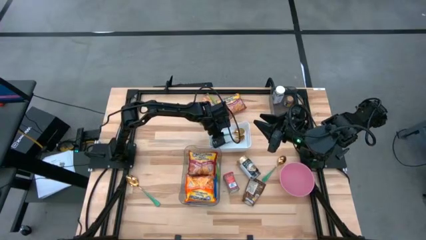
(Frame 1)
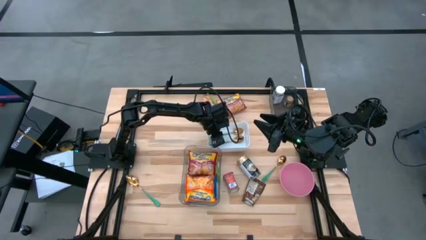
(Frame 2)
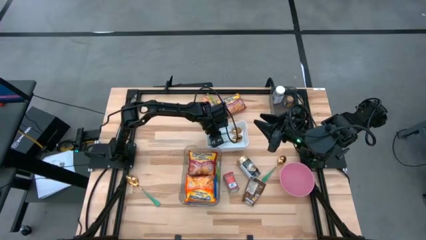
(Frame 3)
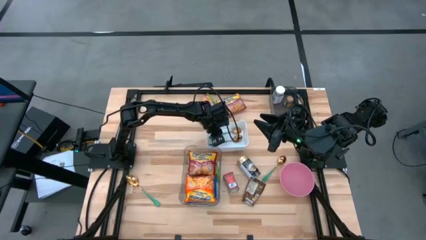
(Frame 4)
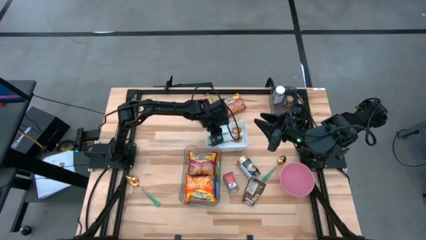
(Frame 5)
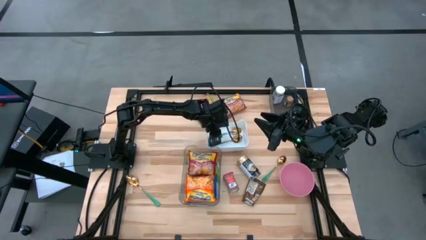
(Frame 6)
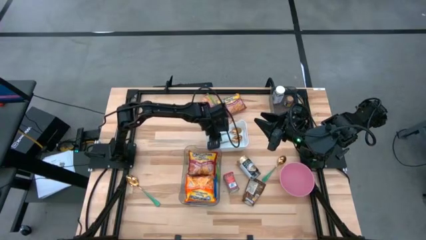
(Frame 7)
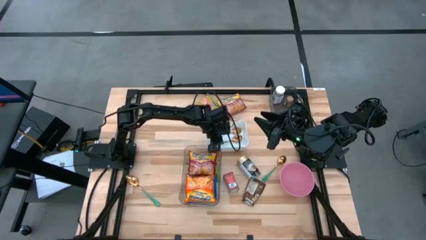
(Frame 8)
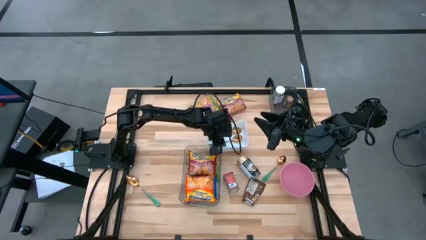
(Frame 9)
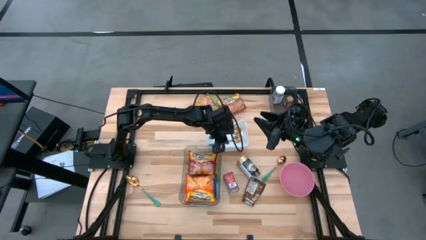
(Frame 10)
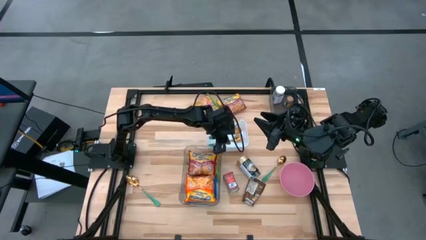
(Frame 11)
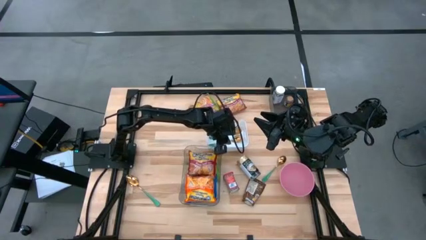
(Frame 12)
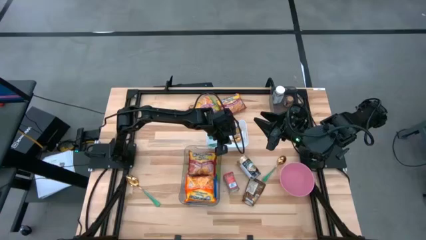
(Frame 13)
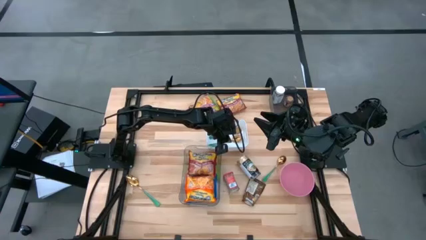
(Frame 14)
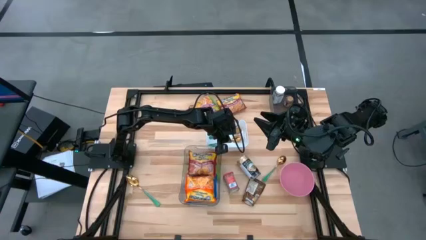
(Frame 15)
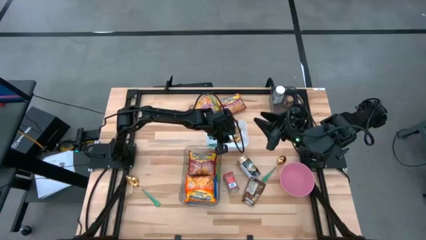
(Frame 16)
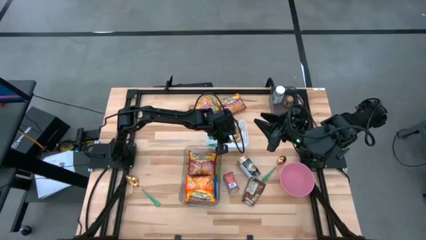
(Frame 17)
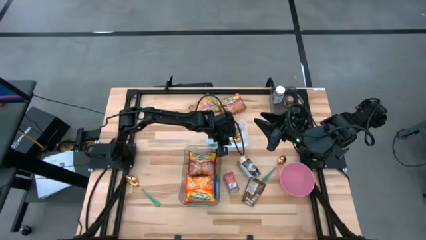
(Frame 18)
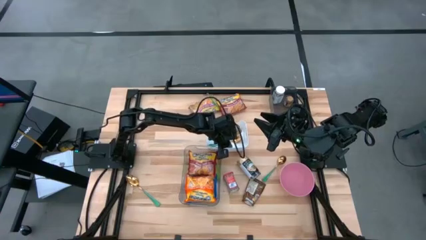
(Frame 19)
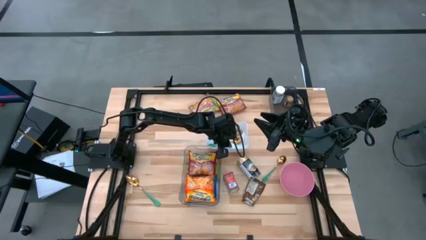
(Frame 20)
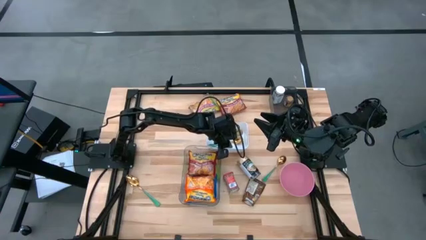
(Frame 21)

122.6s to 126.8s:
Task: Pick & Place Food Item
Adjust the white bin

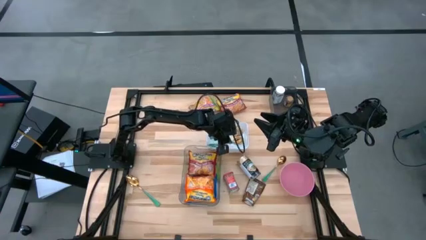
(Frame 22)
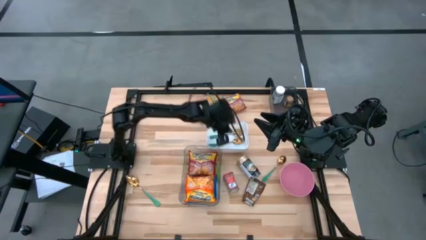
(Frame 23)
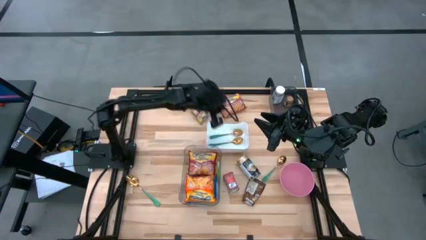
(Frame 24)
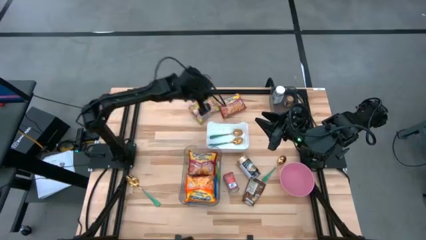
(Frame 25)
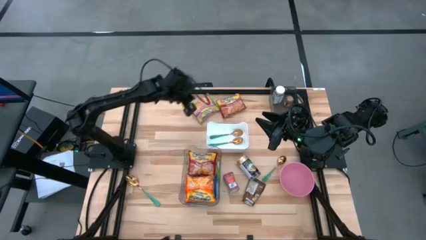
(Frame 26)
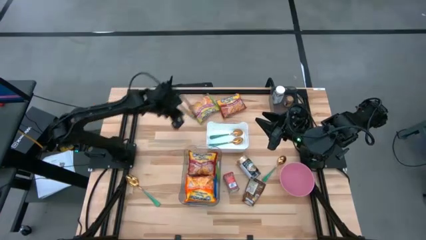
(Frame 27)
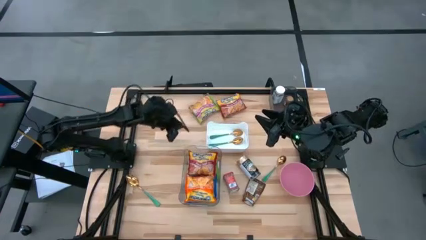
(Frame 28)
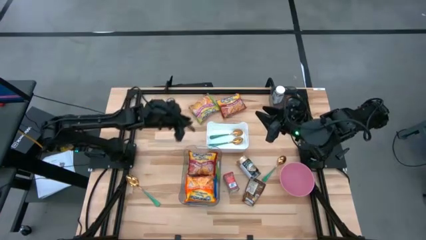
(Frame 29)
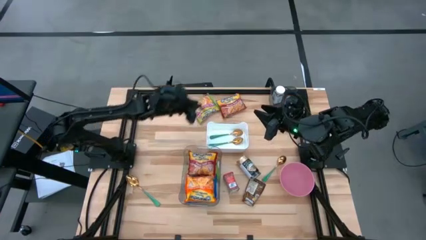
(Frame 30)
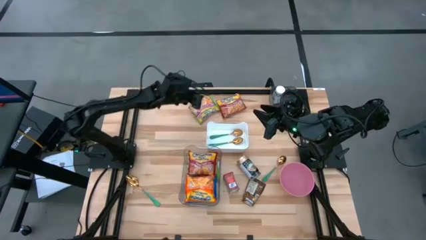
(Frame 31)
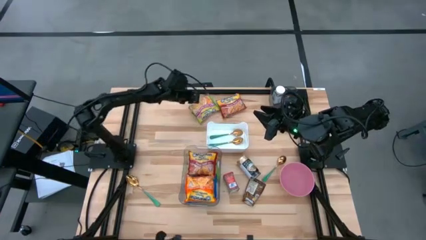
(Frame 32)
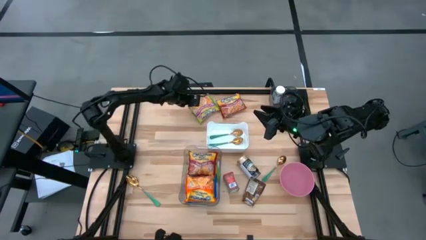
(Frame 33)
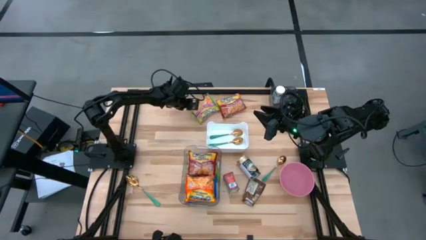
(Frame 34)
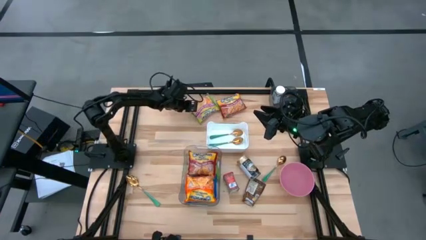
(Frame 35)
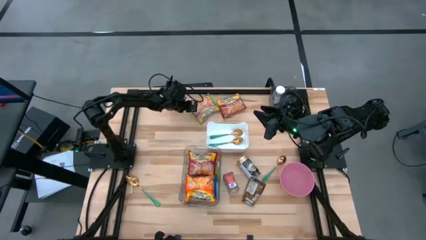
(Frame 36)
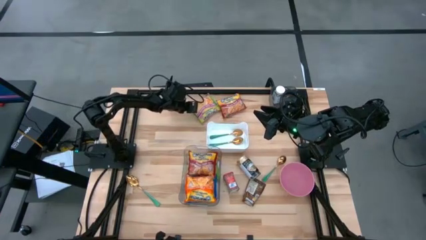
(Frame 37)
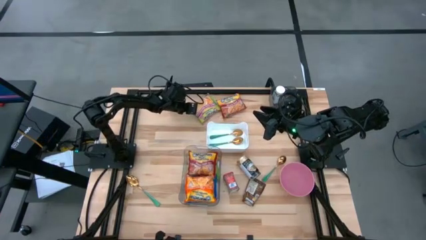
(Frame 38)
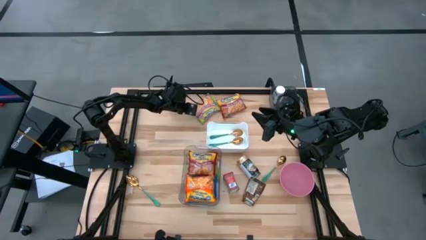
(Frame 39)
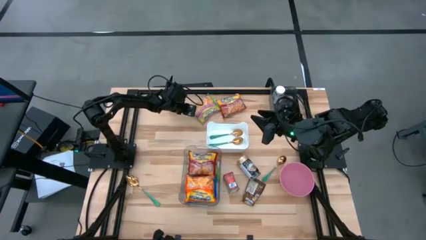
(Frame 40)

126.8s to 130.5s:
Put the green noodle pack into the transparent bin

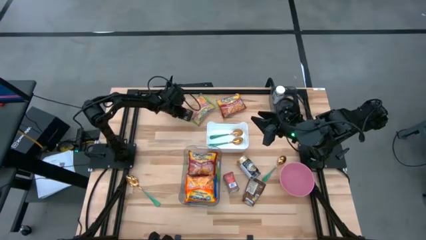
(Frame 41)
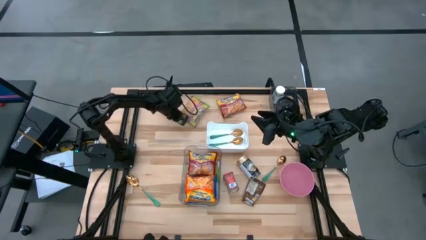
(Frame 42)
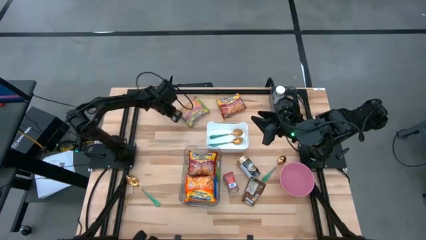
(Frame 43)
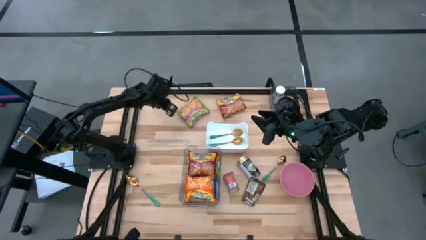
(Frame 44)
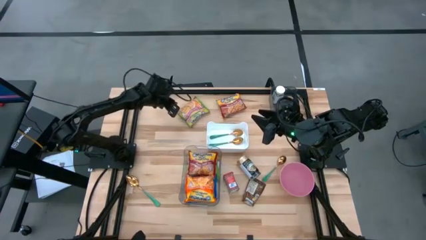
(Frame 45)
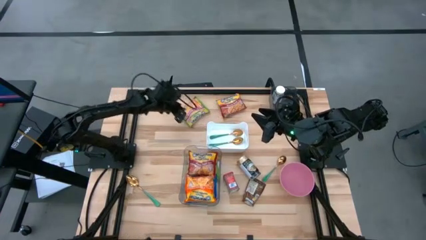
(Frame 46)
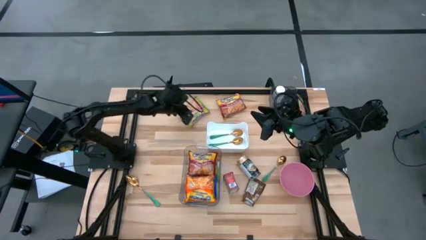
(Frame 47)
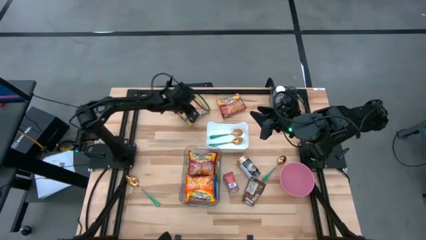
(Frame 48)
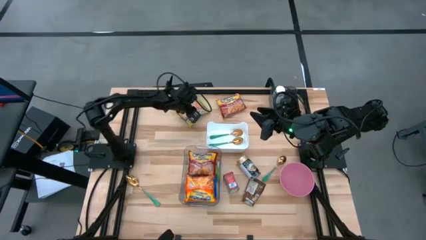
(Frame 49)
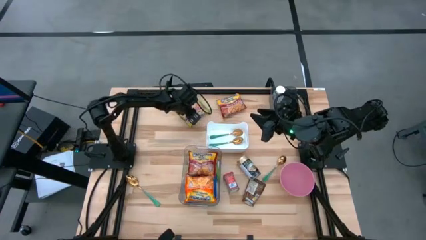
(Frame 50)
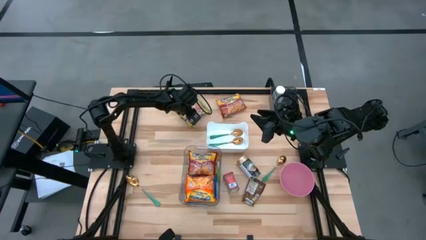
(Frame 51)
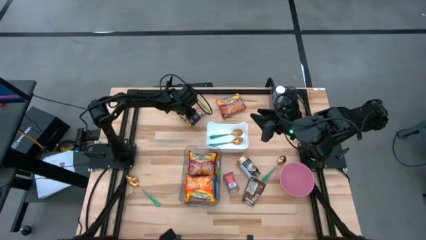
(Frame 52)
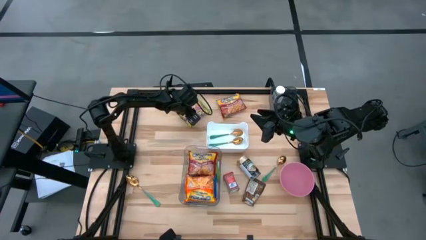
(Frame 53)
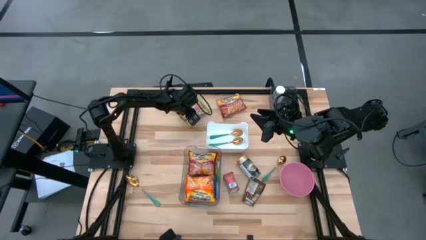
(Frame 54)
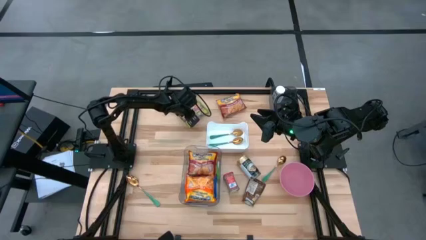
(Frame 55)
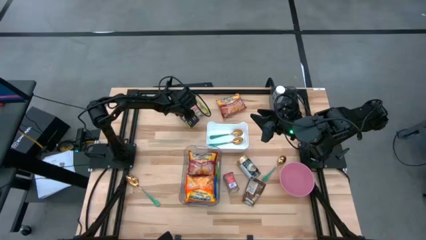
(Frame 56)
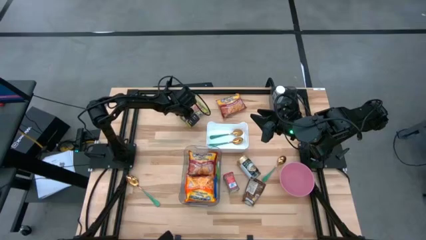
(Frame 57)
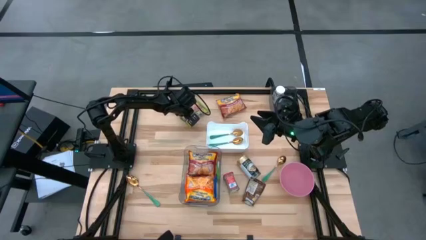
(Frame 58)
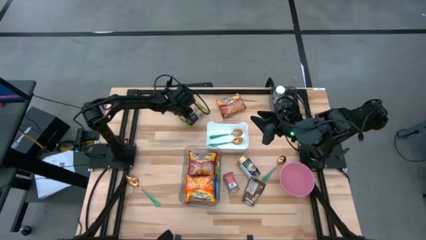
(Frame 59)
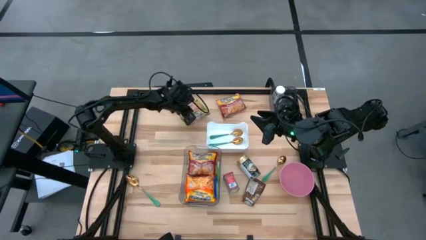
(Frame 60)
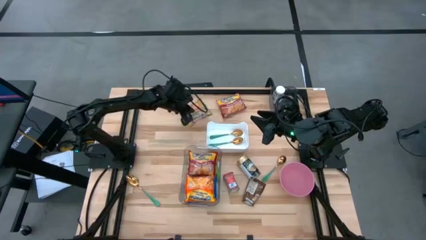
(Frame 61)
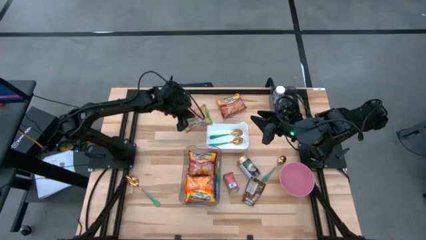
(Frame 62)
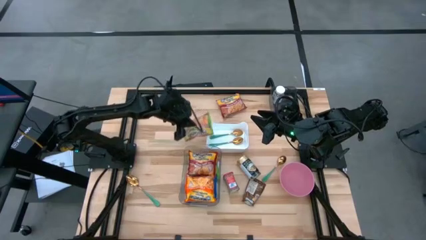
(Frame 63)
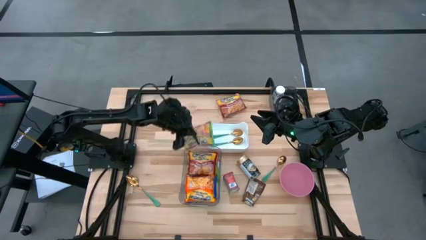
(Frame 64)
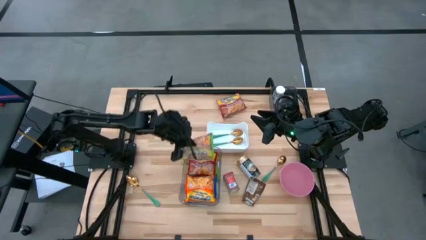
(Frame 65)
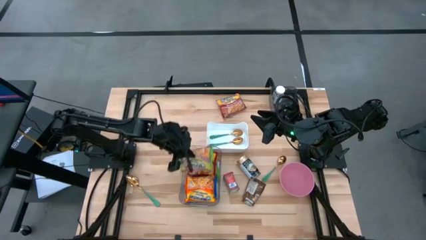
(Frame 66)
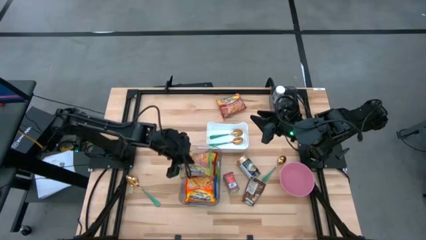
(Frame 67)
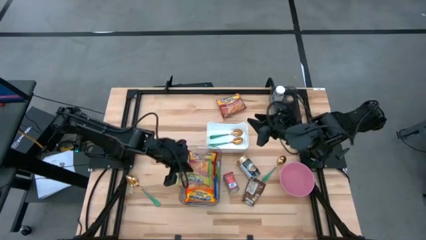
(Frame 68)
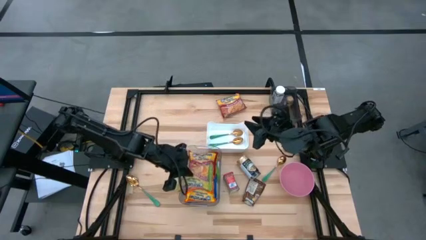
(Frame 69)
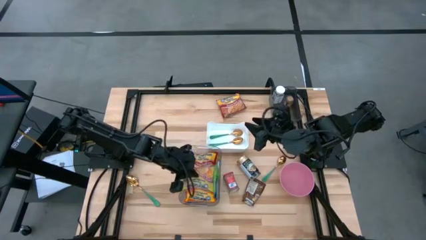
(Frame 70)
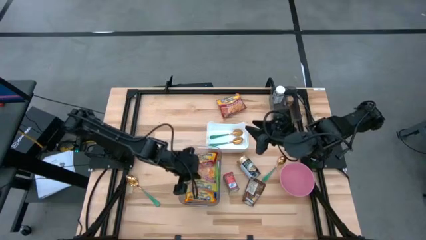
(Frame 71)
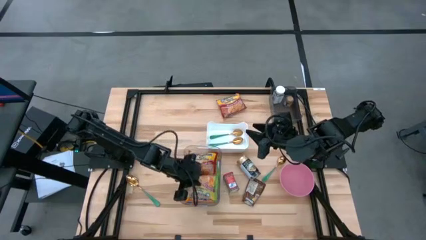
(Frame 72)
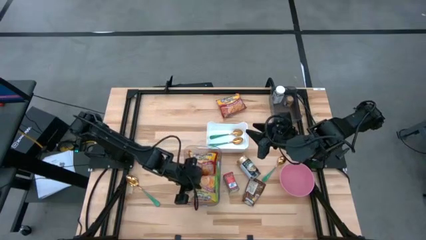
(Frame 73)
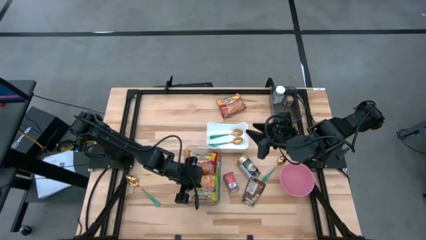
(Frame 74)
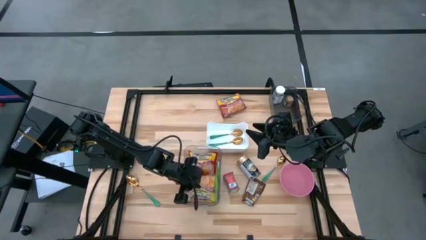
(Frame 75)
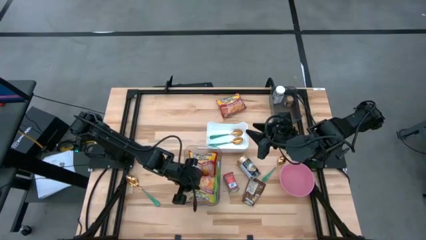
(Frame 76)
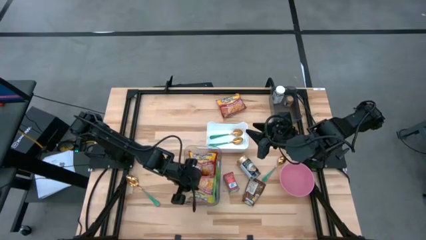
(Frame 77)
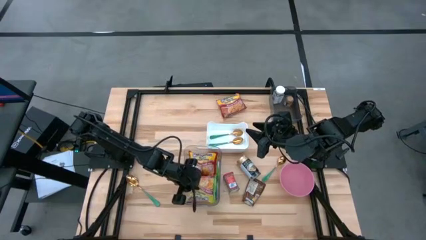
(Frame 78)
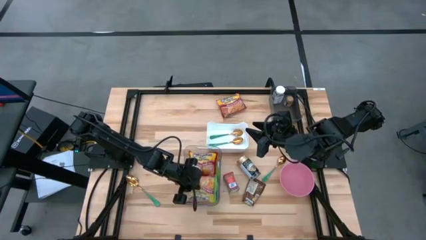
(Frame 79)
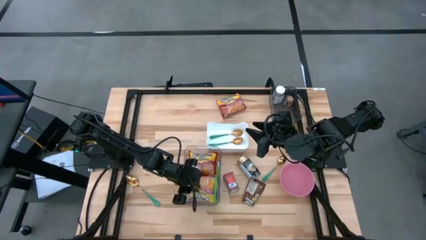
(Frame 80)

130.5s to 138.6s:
Put the green noodle pack into the transparent bin
